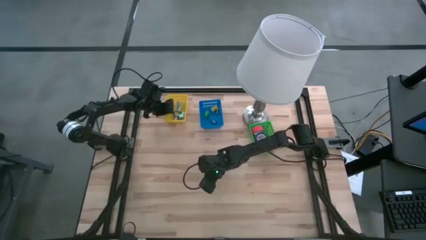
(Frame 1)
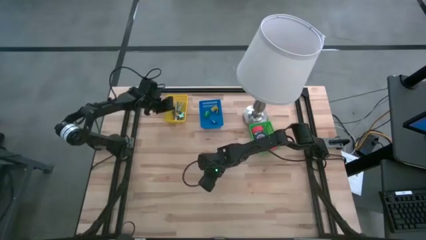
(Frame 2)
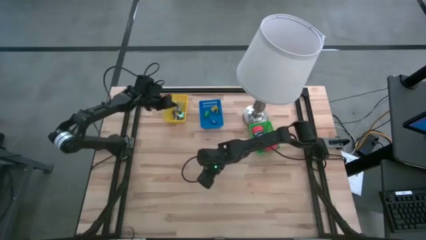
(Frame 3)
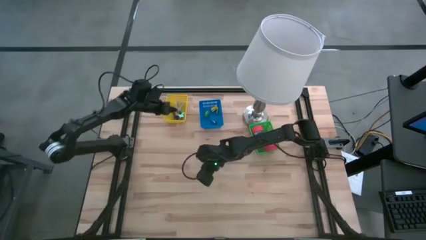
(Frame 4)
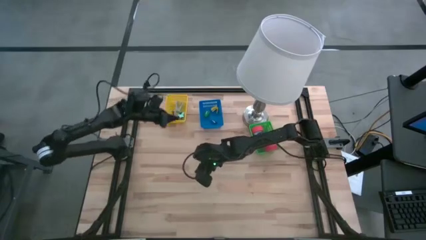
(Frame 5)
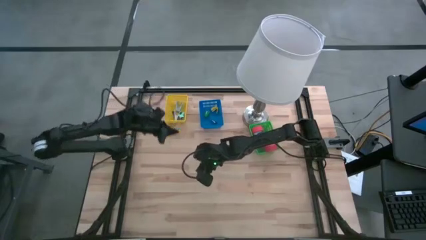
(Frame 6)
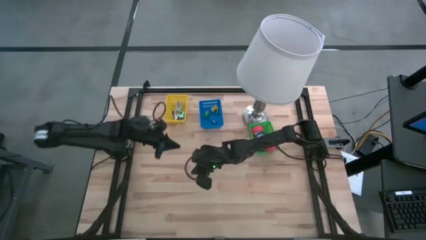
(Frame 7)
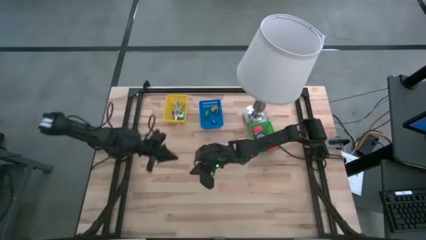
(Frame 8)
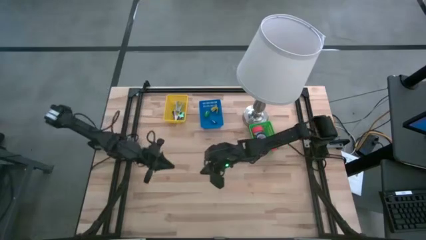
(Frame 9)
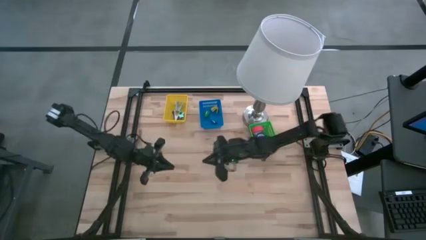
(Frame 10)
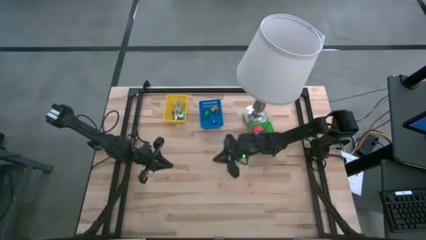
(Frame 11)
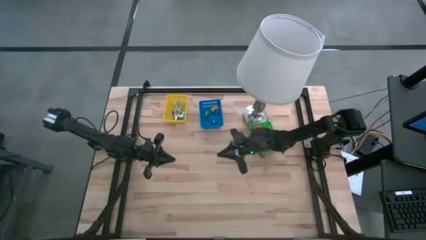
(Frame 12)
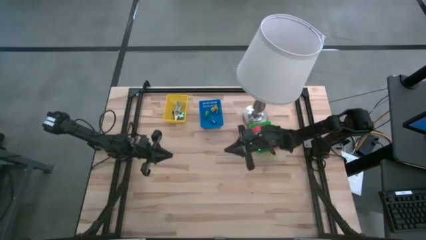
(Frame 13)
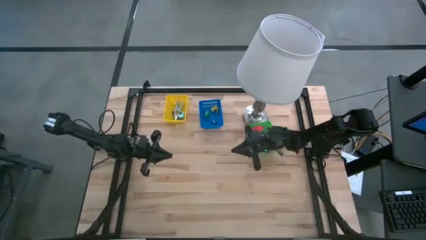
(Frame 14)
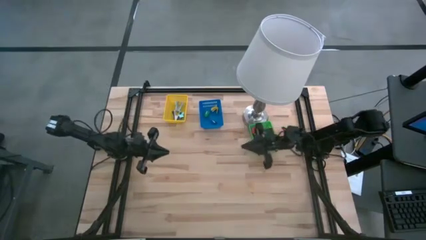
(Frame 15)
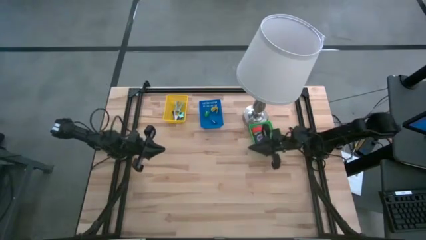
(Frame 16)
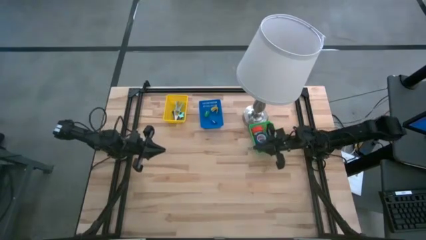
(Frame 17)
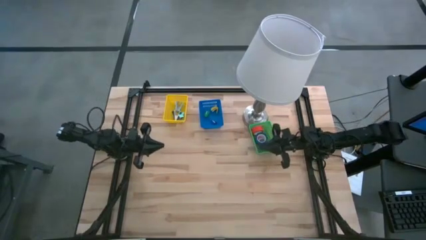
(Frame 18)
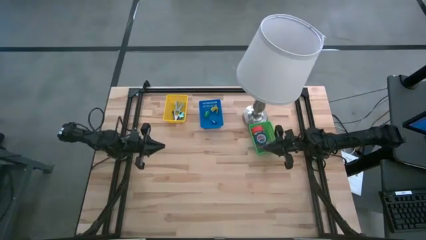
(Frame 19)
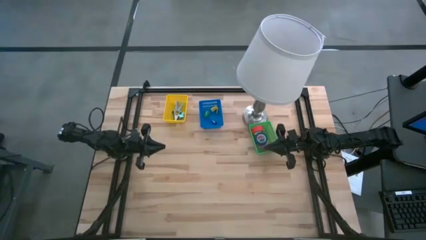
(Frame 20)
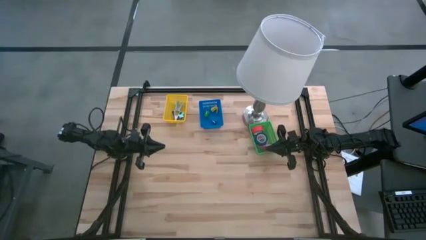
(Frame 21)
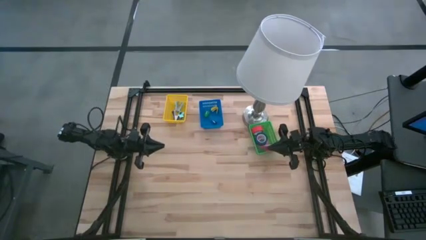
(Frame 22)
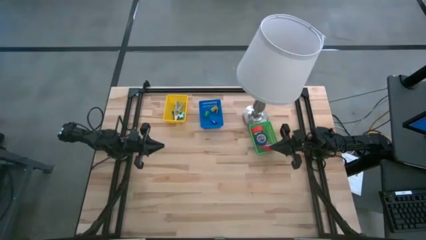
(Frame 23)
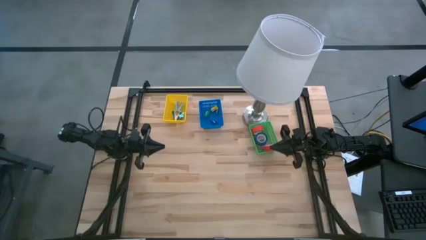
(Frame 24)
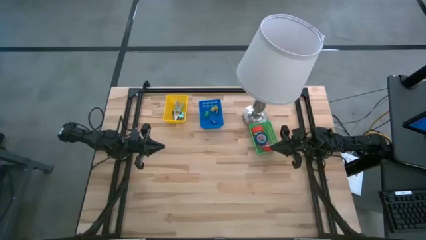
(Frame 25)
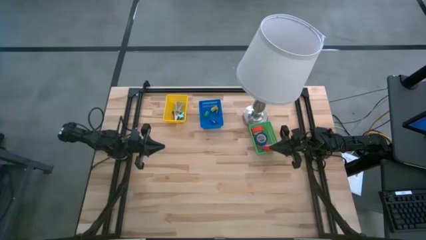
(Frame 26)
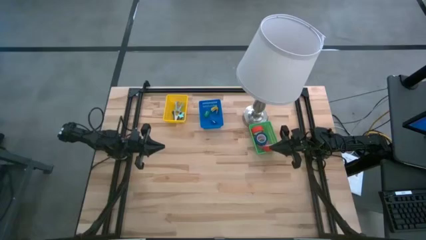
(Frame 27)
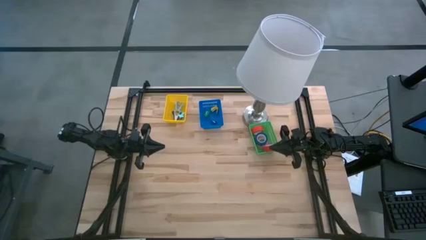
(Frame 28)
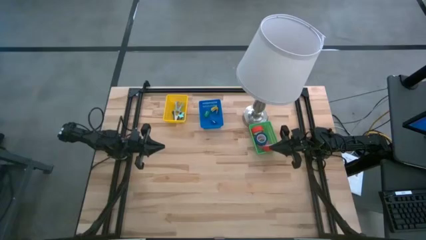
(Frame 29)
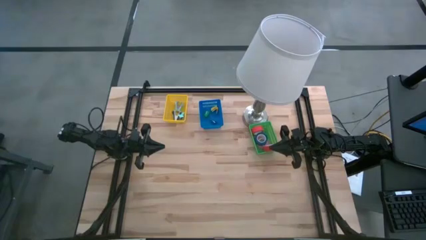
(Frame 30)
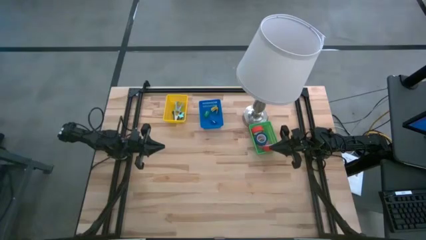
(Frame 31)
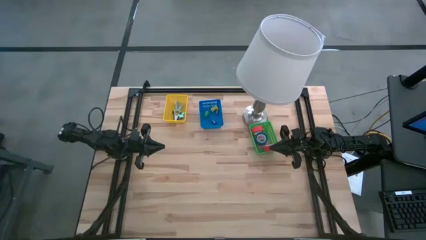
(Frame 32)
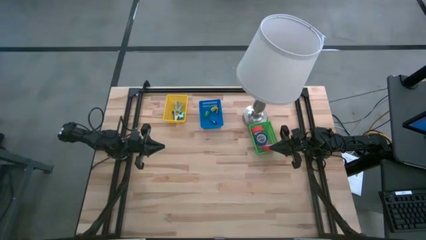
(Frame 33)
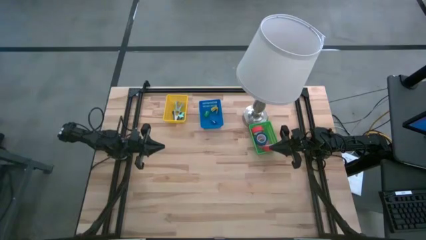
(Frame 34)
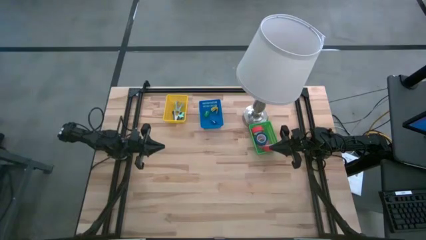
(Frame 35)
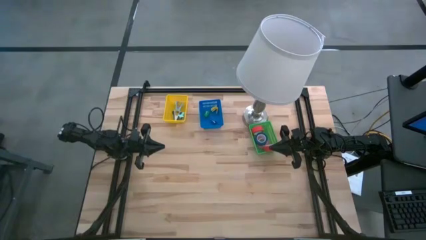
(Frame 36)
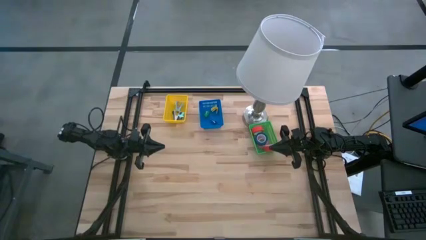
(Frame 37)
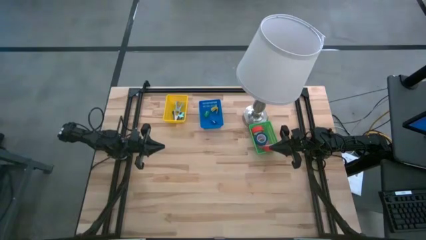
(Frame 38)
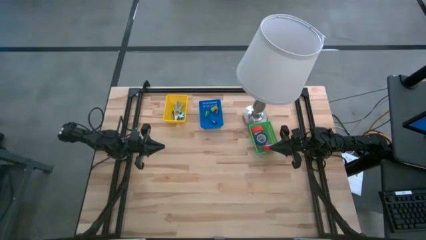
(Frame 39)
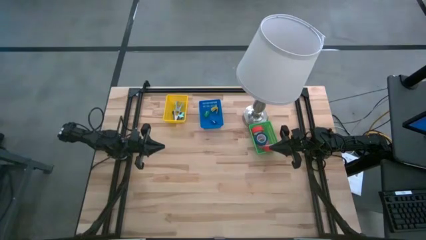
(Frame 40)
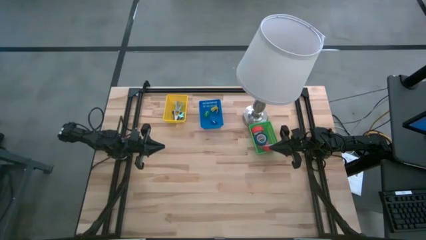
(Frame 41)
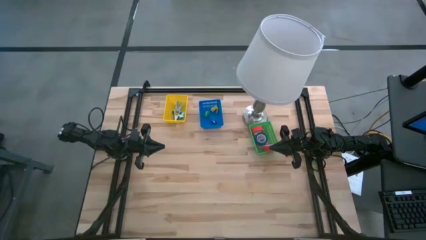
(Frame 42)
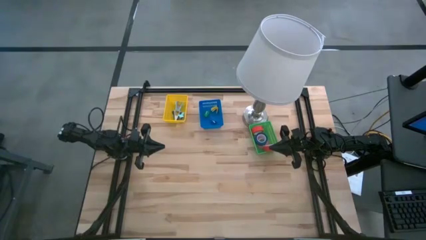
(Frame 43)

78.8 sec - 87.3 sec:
Task: Pick and place Stapler, Stapler remover, tape
Return to Home Position

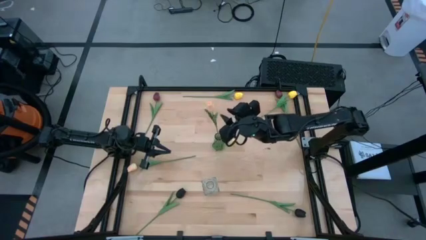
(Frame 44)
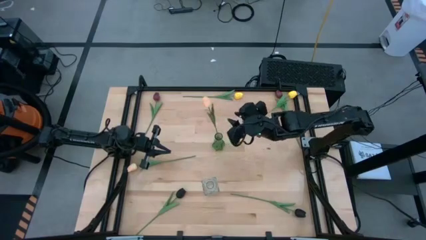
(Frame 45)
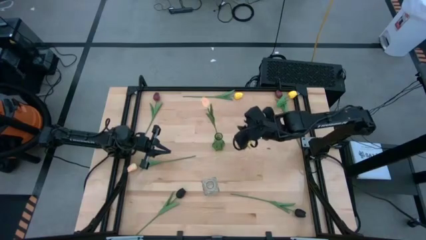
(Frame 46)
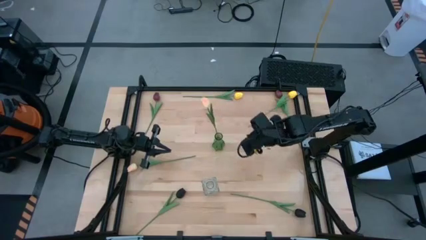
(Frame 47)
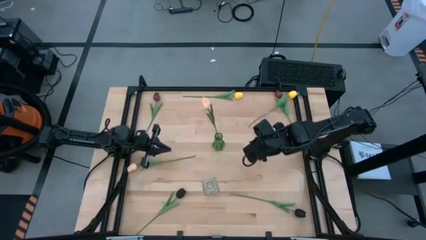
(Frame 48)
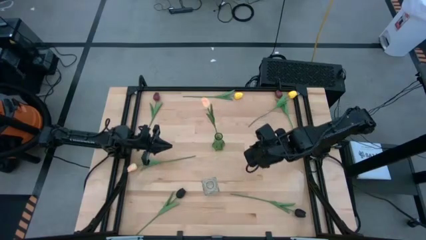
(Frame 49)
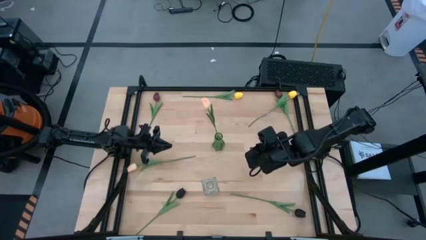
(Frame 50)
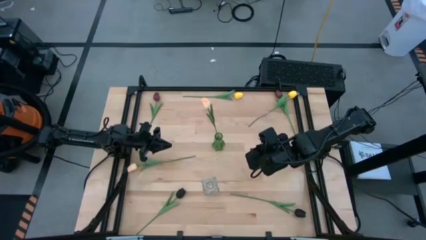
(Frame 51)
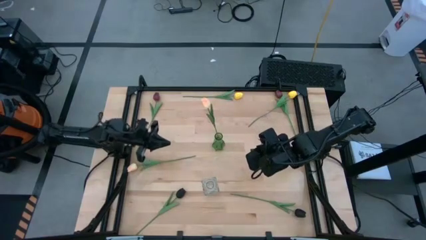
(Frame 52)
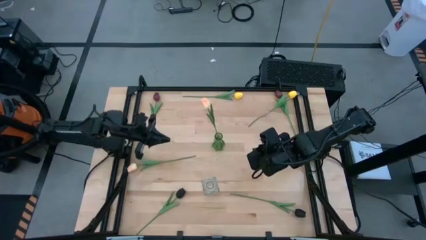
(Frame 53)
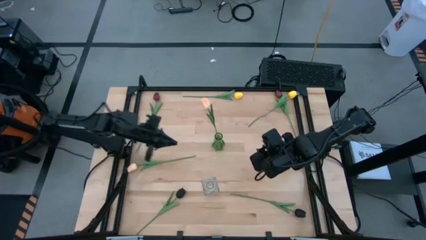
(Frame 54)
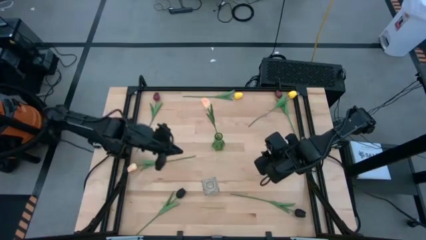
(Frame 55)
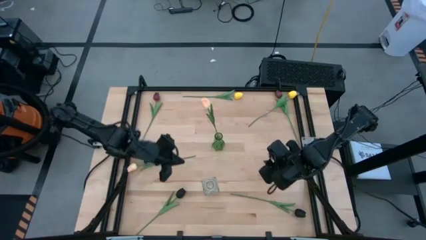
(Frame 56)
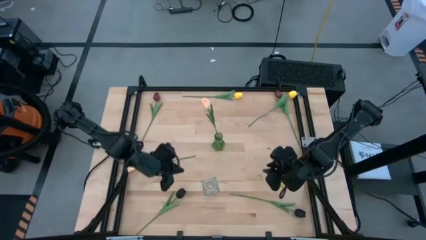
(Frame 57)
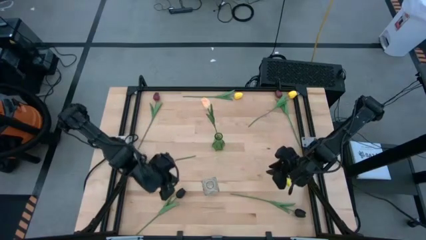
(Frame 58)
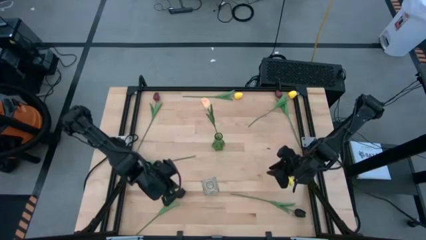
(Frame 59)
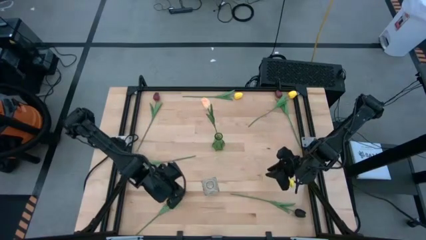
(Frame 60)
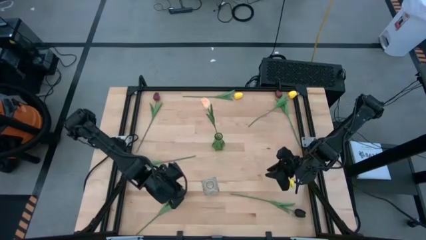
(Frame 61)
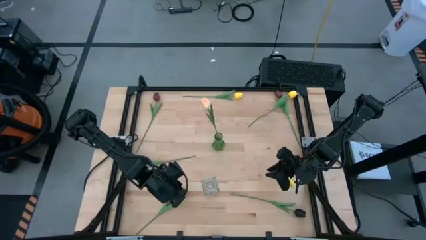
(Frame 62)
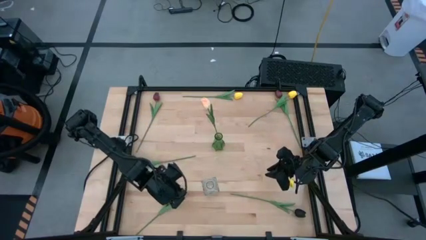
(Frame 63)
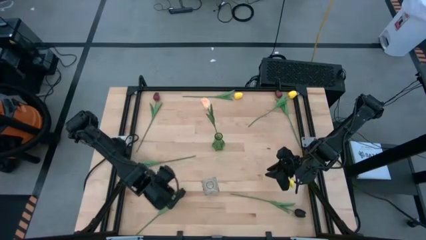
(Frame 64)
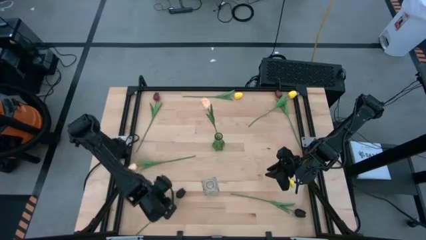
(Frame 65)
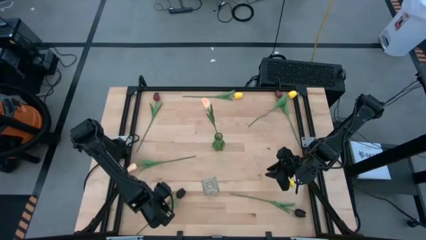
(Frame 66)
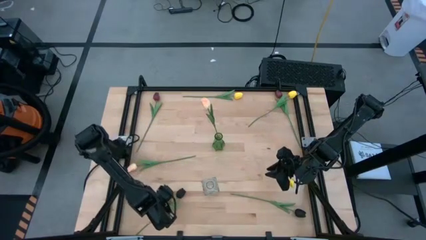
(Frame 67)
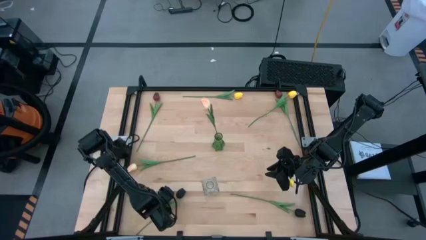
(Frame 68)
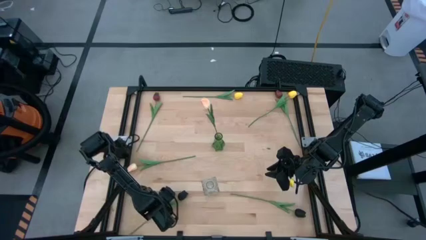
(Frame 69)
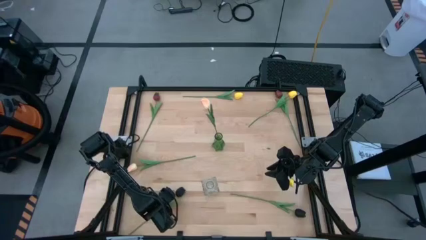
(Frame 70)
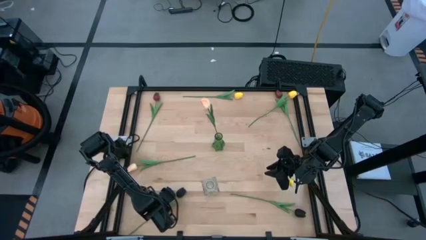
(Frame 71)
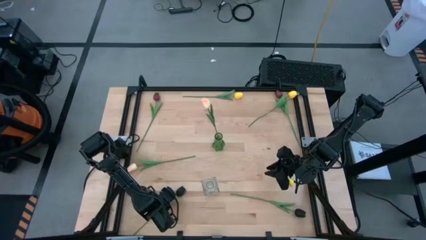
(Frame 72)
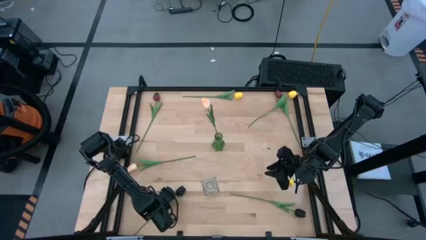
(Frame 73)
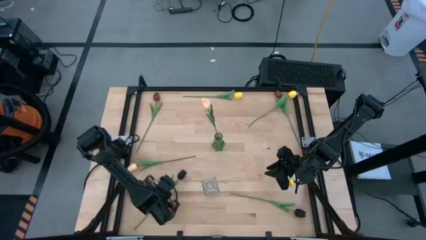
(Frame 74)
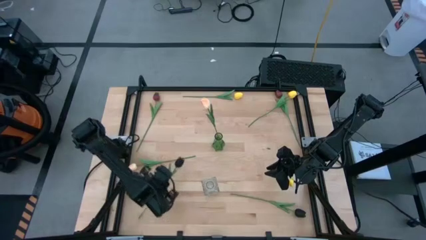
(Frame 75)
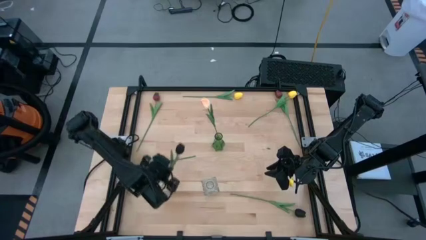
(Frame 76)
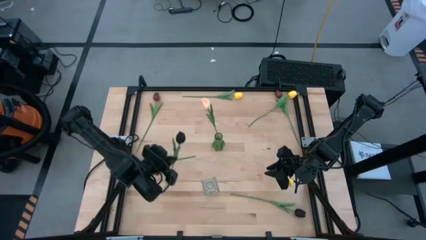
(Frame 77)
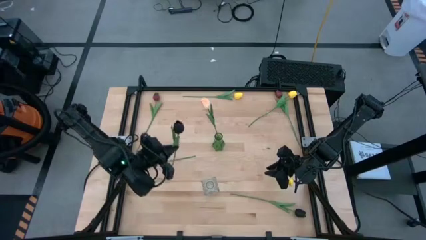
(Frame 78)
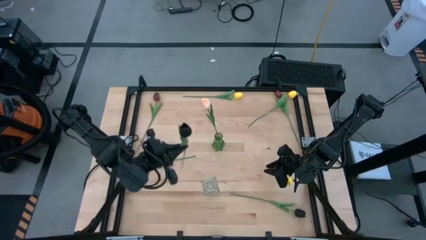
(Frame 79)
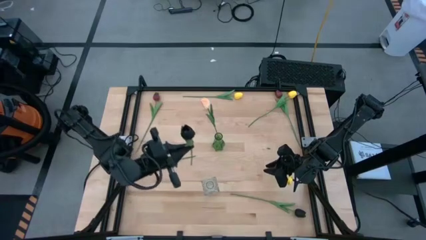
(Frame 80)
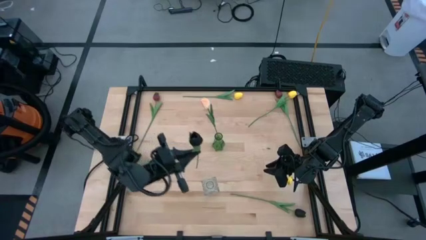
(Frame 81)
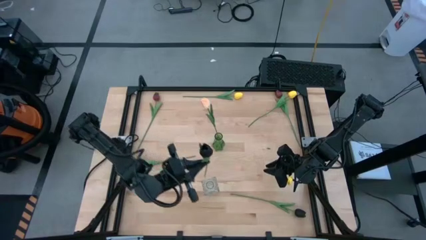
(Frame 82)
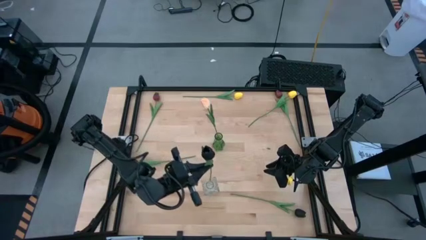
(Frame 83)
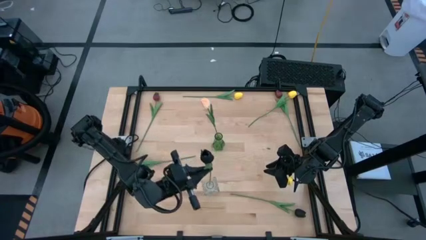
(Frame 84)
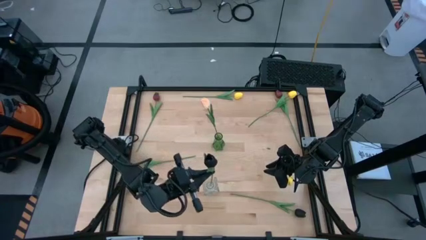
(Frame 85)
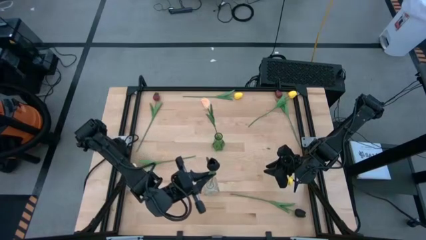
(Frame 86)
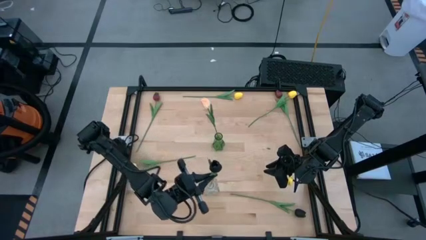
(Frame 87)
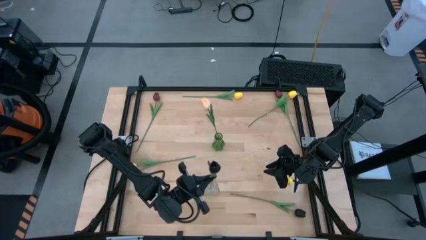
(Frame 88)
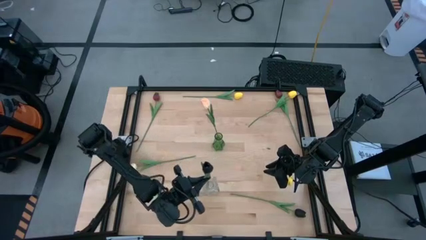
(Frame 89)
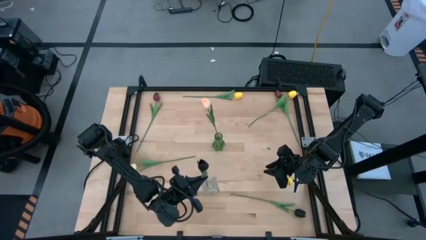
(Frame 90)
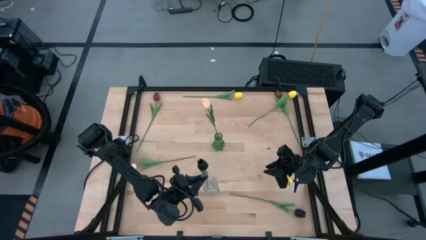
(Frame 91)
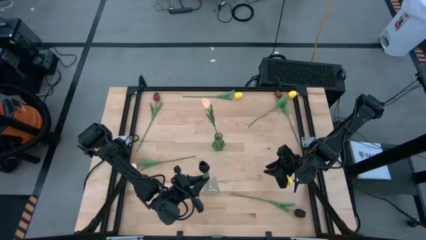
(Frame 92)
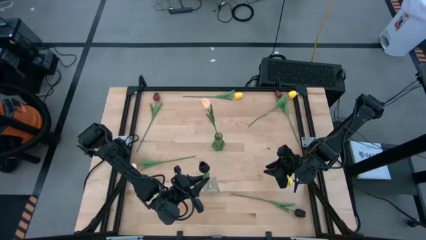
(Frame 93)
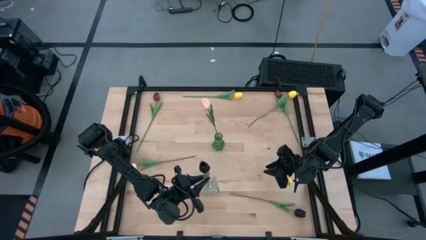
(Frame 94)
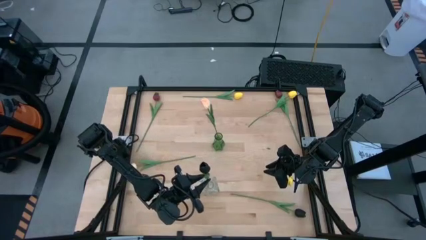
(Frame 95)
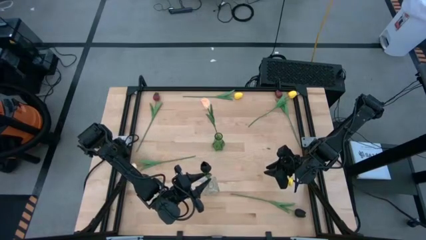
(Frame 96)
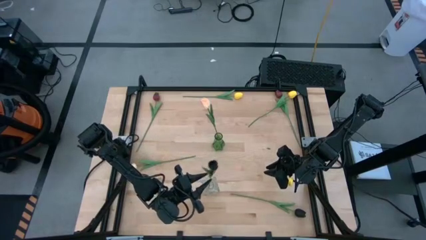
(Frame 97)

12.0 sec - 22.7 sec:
Task: Sort flowers into vase by color
Put the left black flower into the transparent vase
